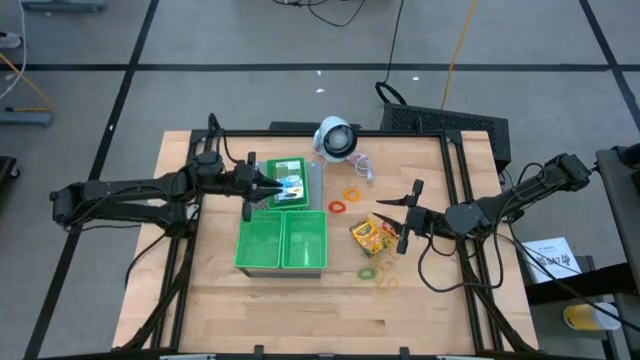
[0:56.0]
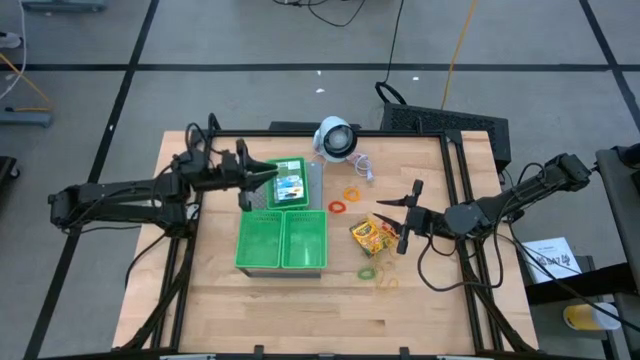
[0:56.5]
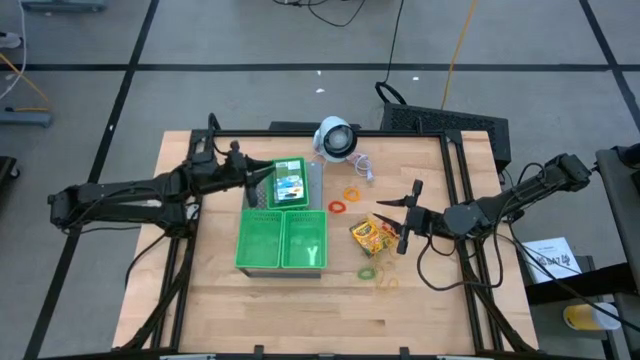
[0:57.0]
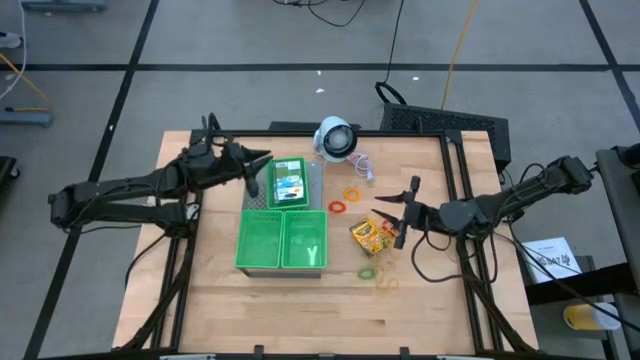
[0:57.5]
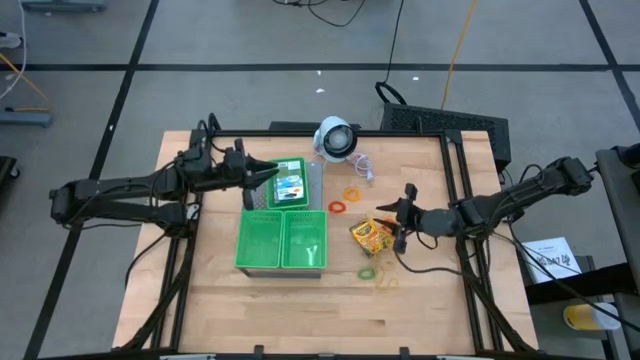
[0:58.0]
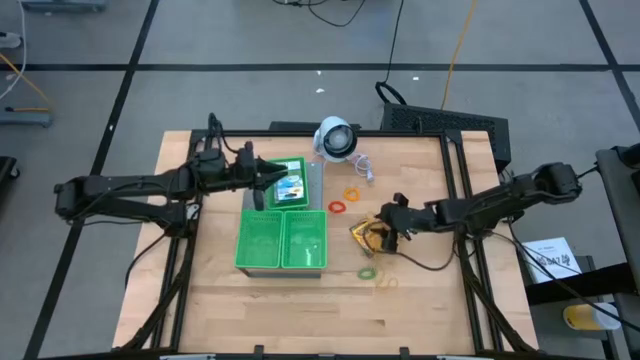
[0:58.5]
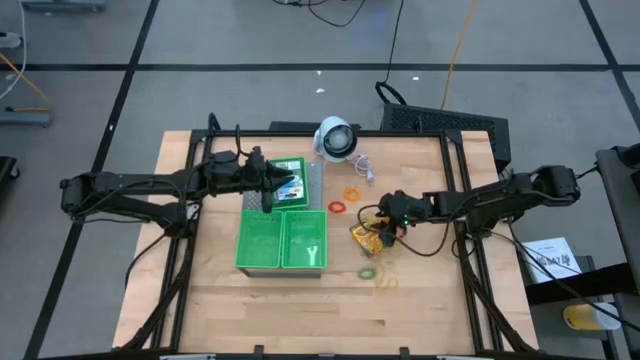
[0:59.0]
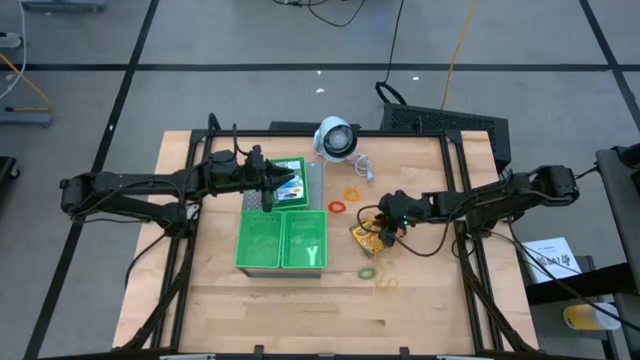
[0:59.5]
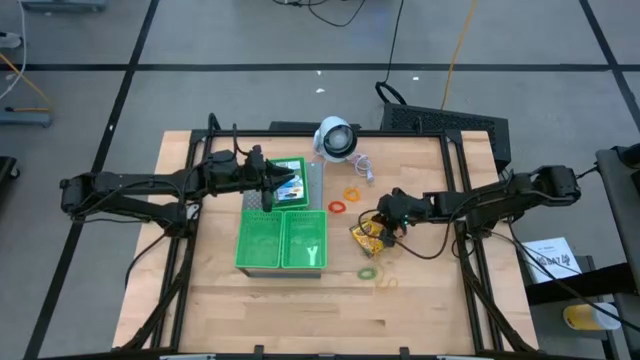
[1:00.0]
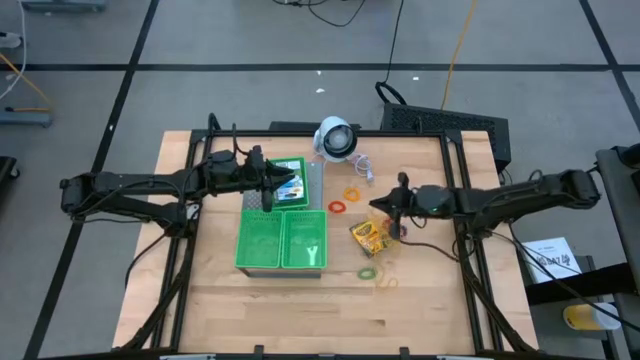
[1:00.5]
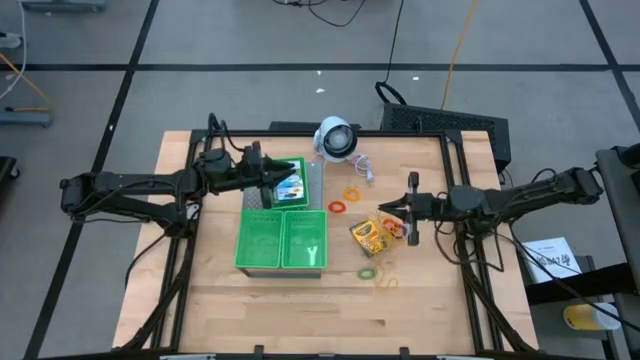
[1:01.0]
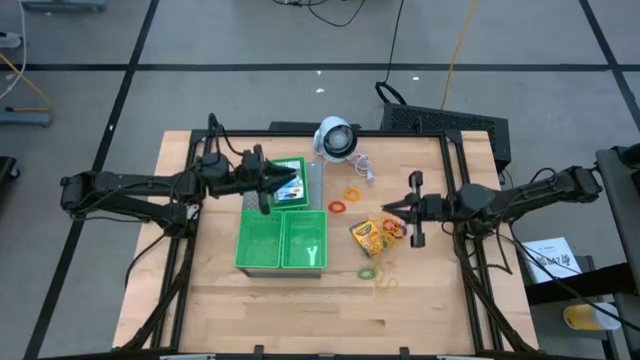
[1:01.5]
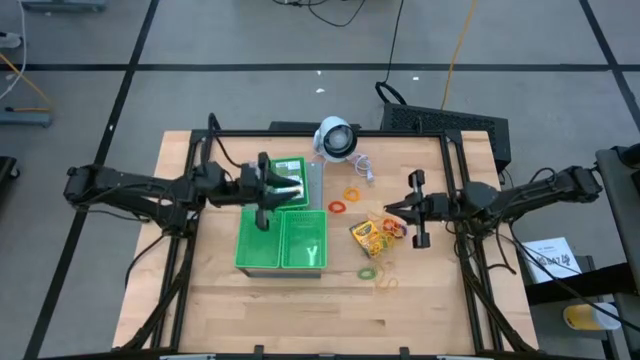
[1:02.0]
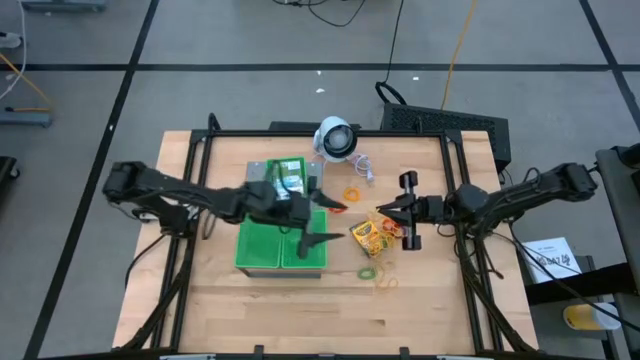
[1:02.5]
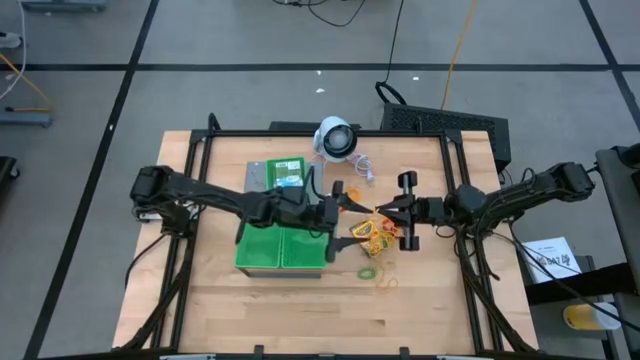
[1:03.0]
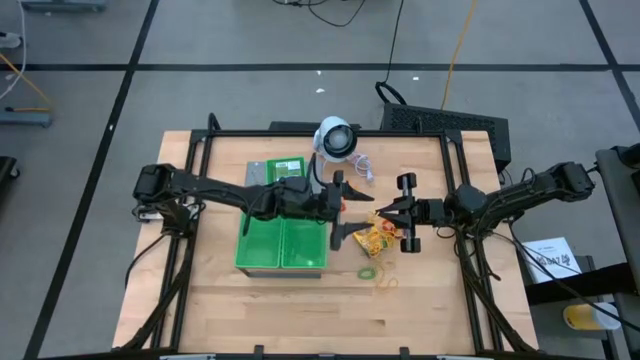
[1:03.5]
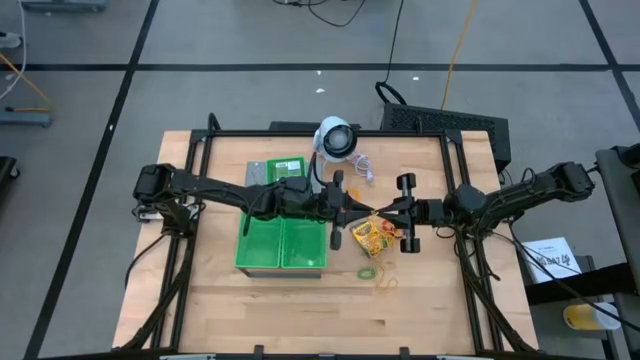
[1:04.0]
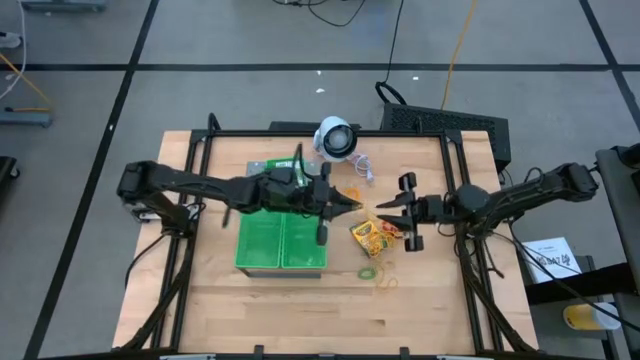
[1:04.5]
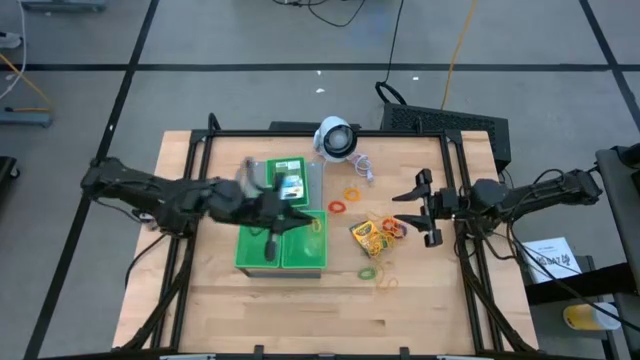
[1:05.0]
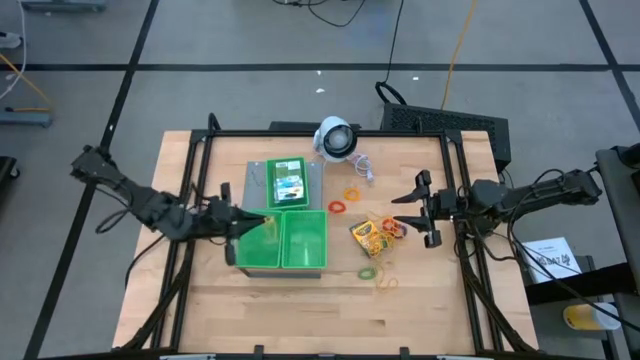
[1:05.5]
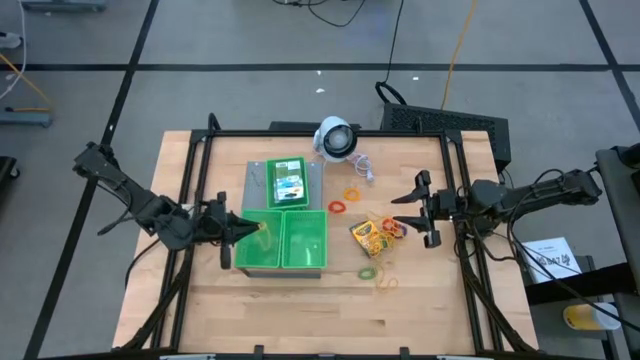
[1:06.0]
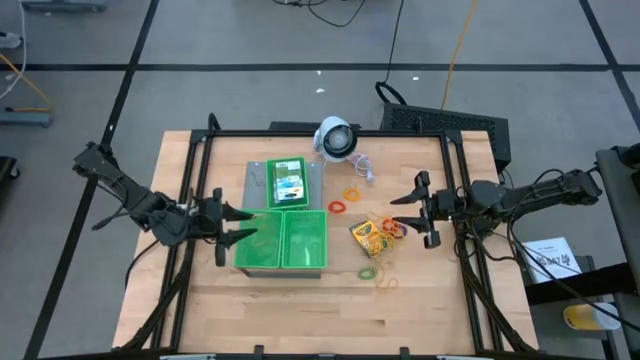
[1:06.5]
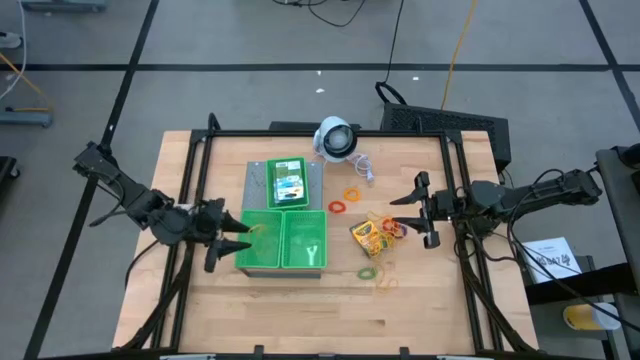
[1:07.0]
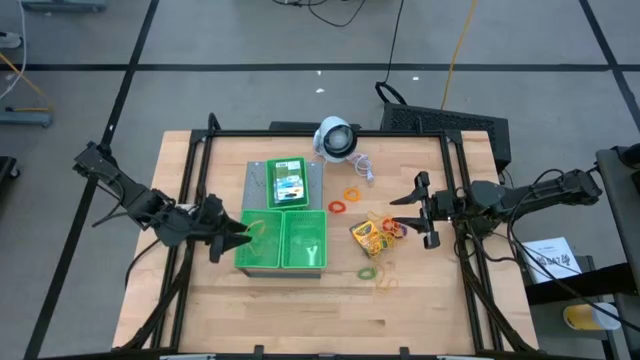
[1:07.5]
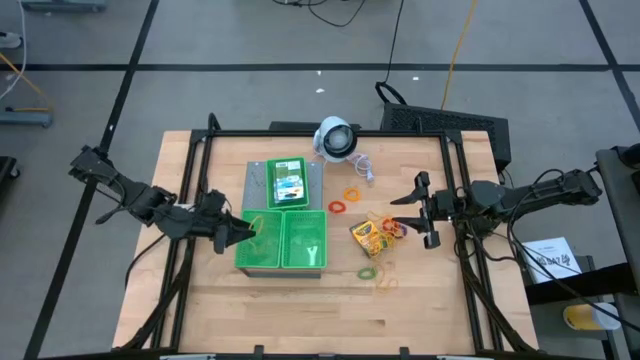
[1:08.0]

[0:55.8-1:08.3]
Task: Pick & Place Office Desk Supplies
Put the yellow rubber band into the bottom left green basket on the shelf

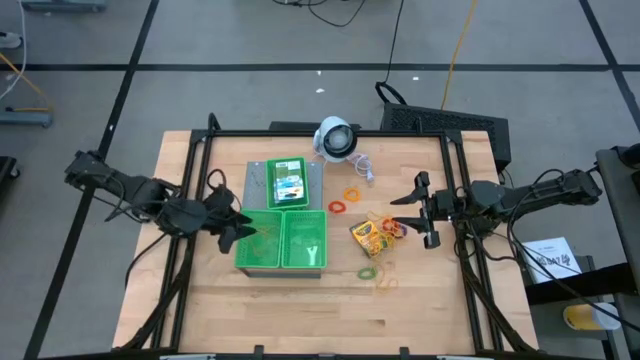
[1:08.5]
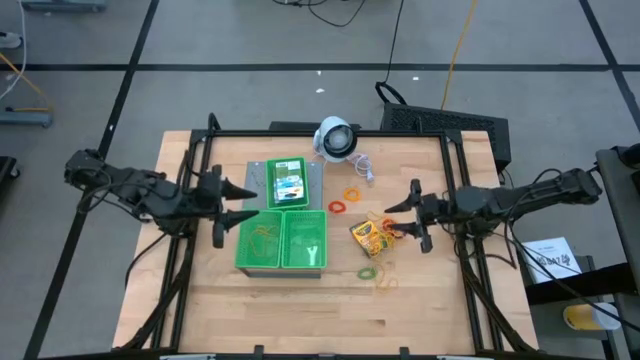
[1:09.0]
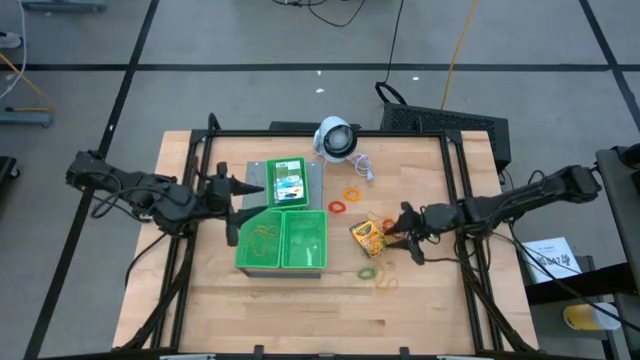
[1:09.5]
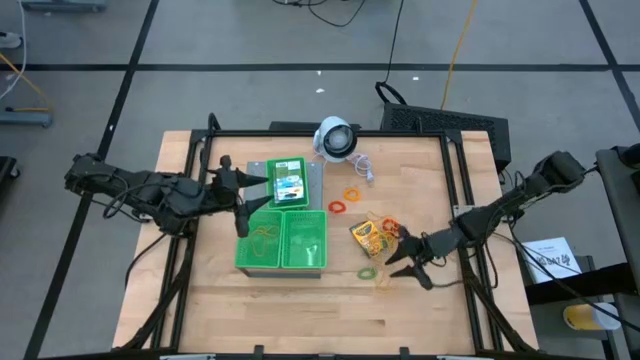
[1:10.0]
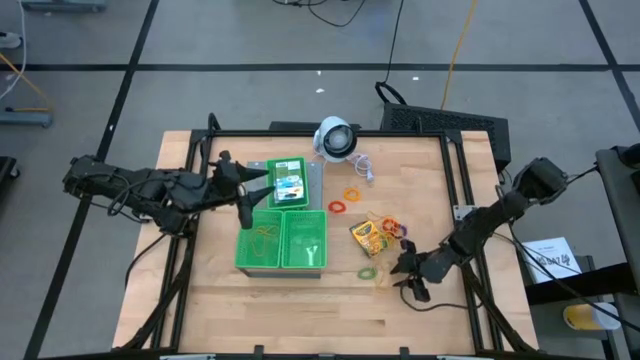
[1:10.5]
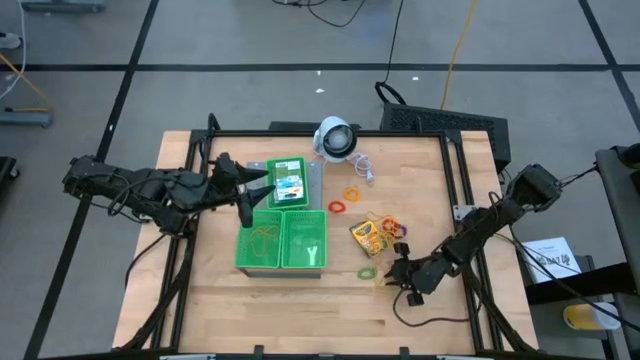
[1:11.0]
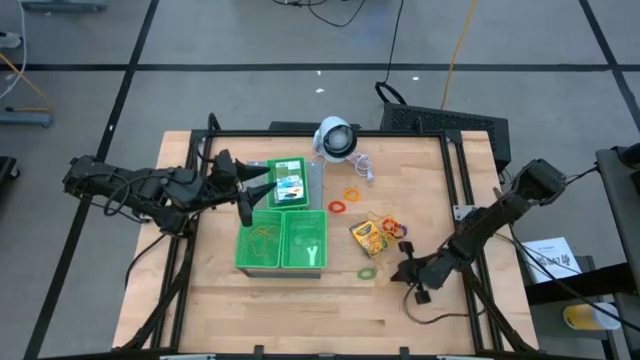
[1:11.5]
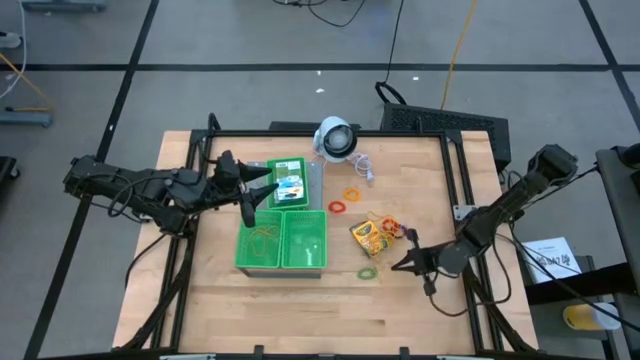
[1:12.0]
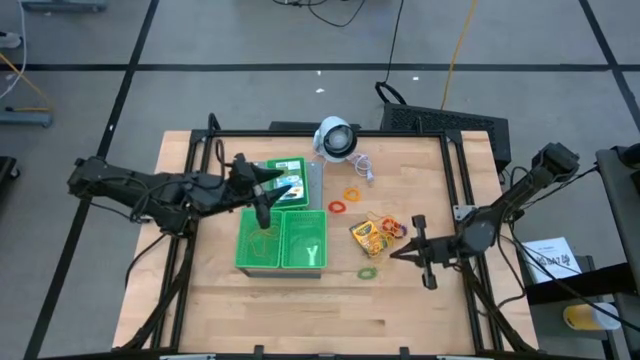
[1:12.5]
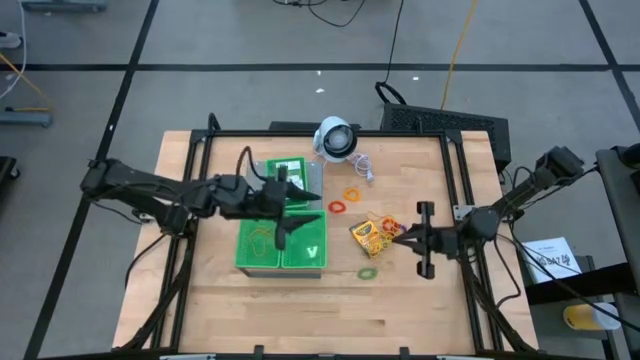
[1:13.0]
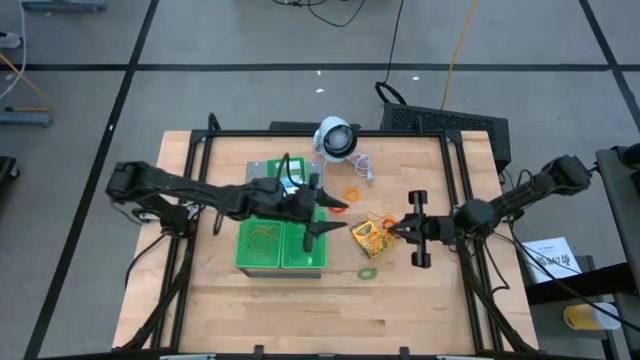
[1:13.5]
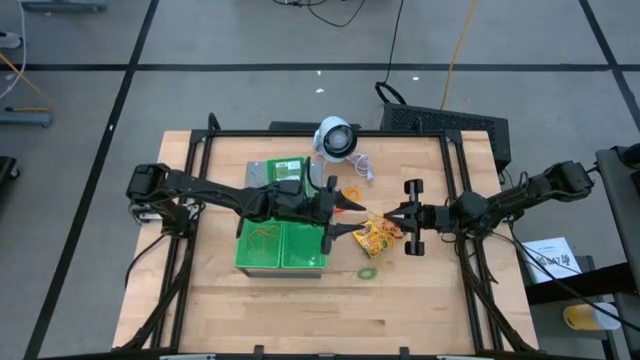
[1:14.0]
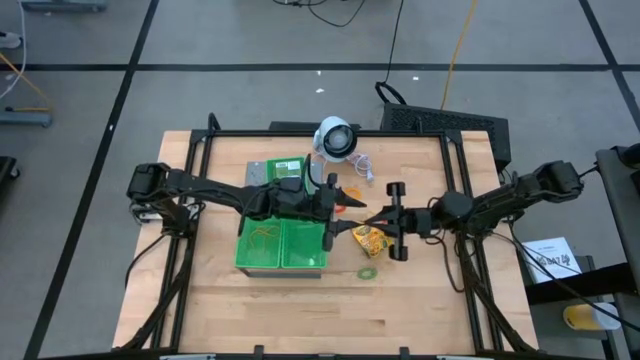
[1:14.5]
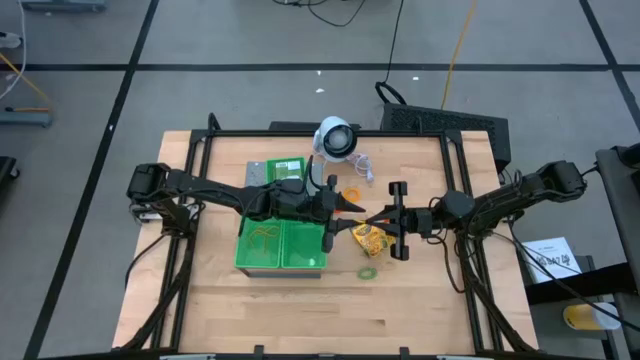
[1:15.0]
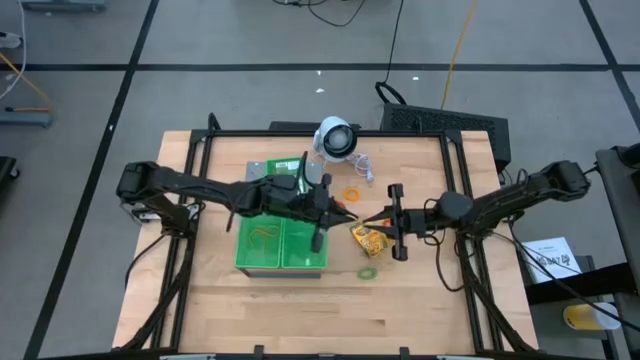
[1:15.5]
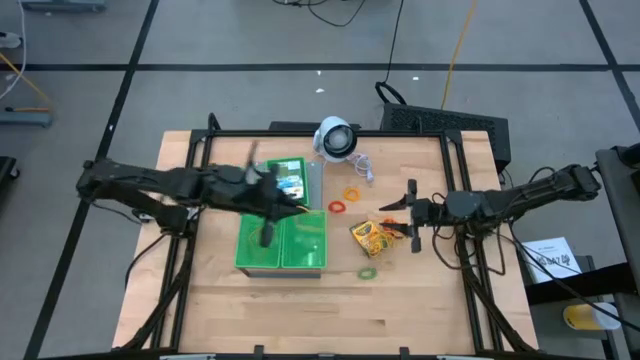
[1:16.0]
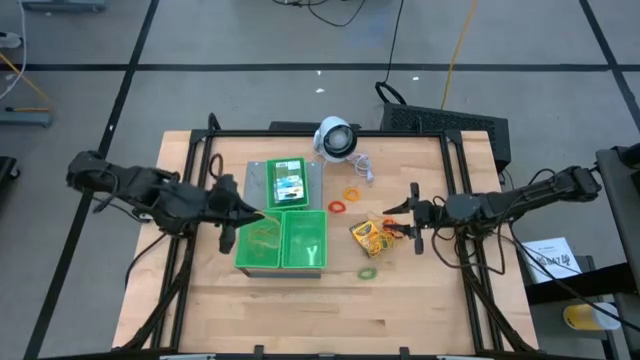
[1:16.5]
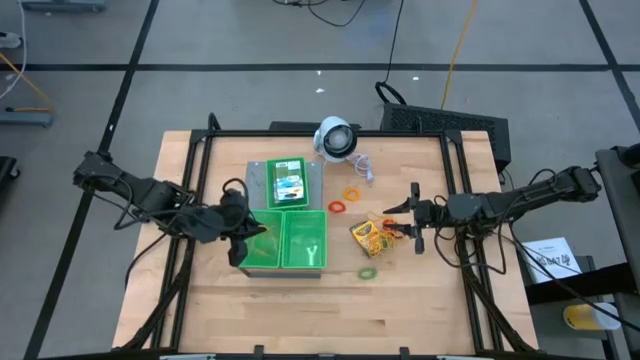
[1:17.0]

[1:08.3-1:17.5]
Put the yellow rubber band into the bottom left green basket on the shelf
